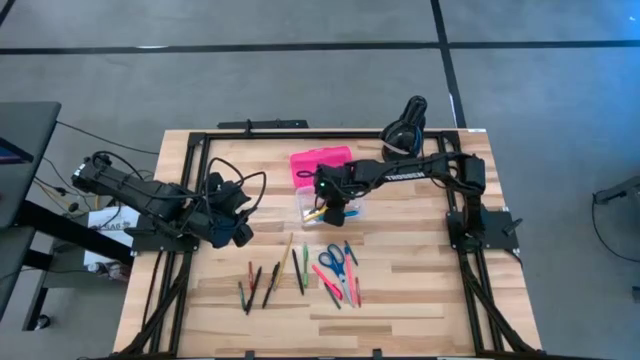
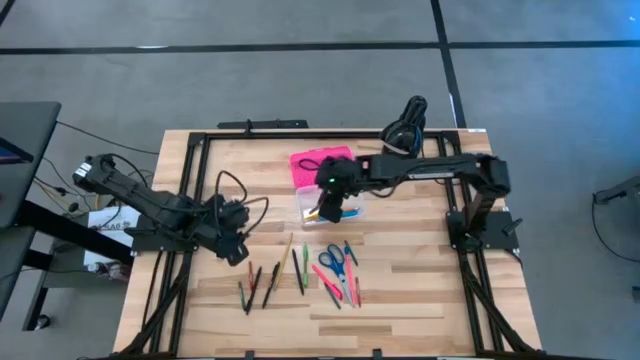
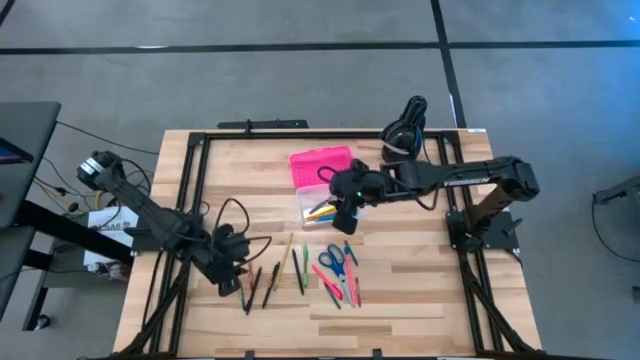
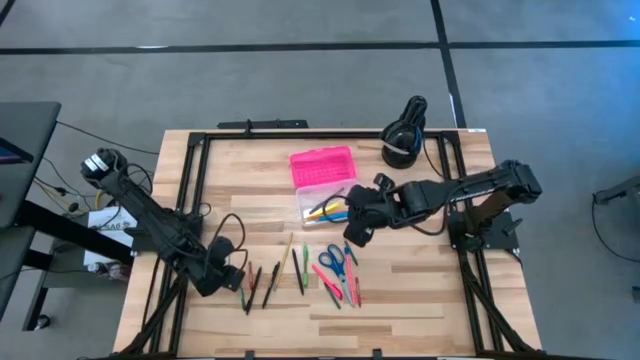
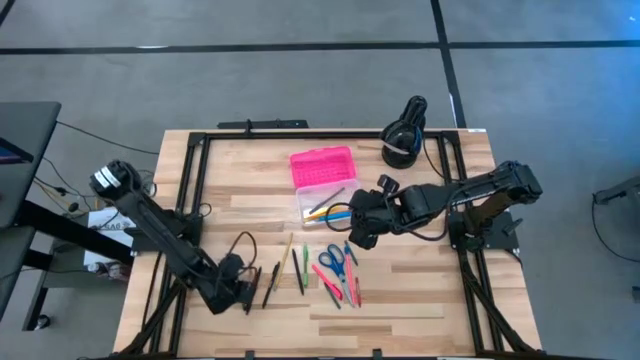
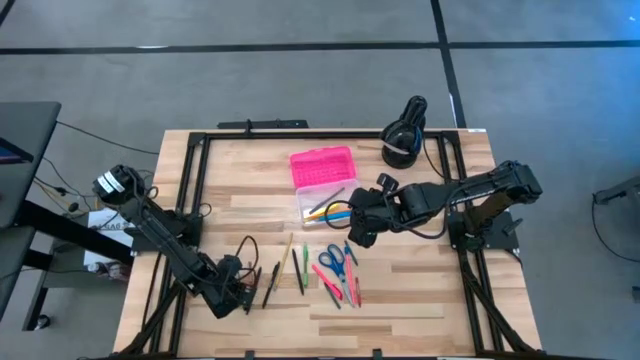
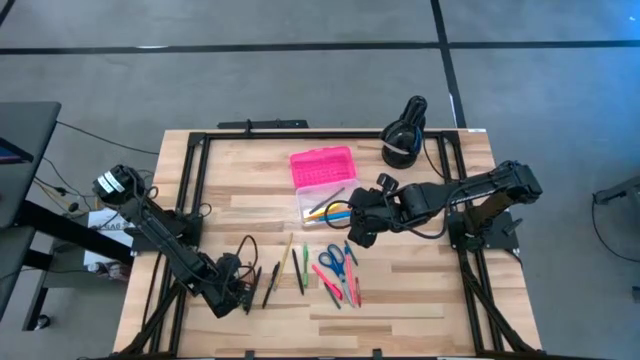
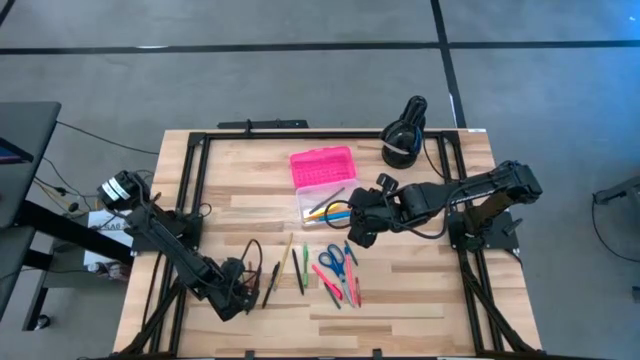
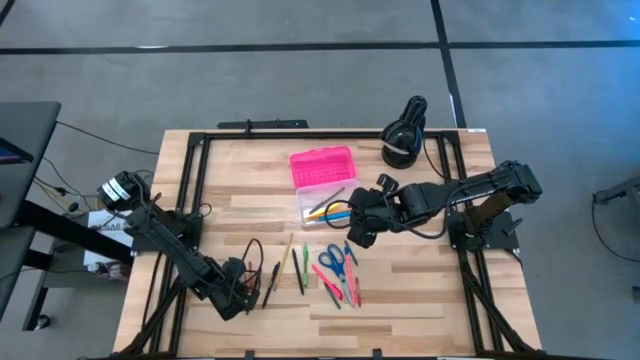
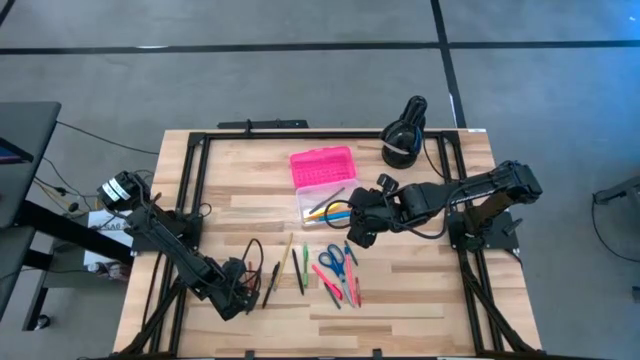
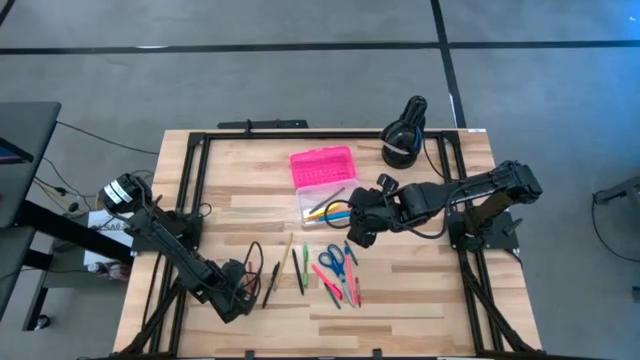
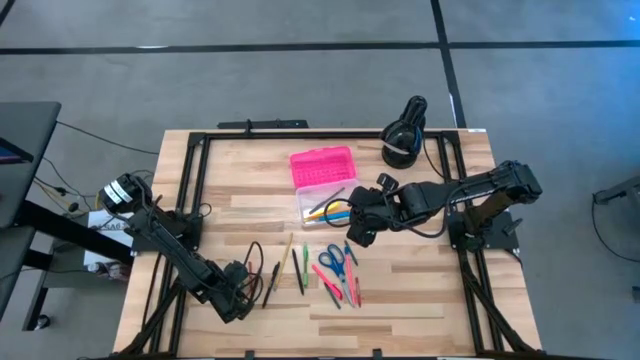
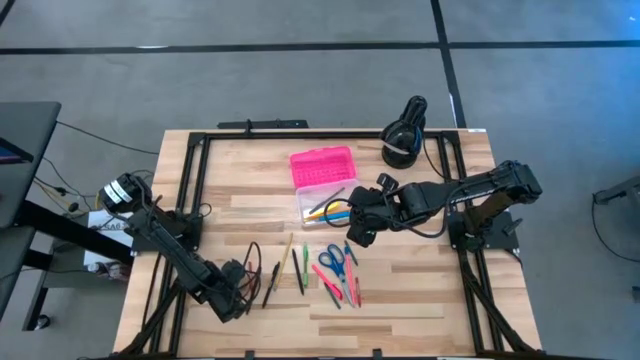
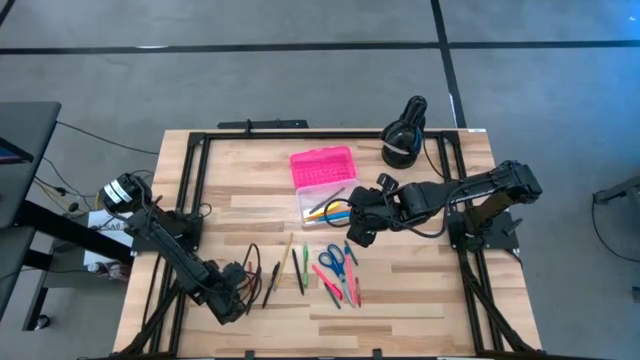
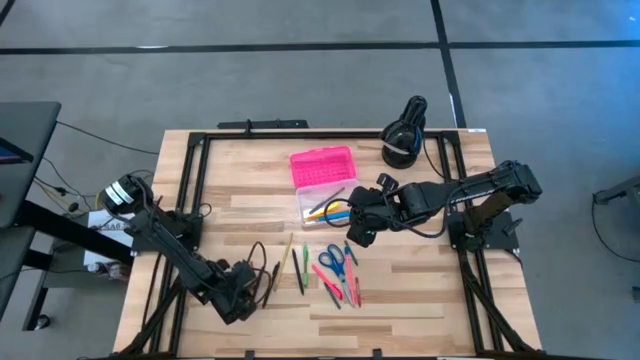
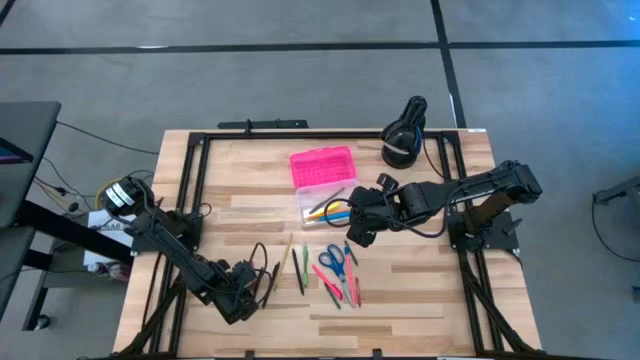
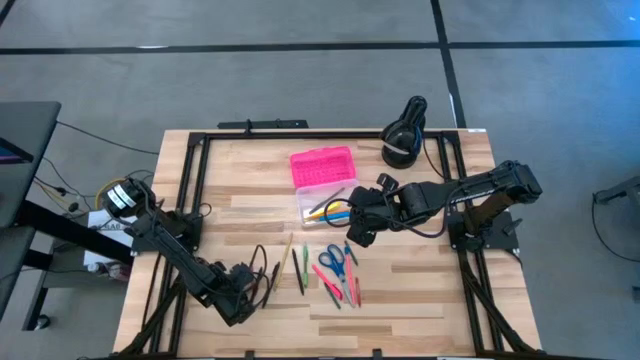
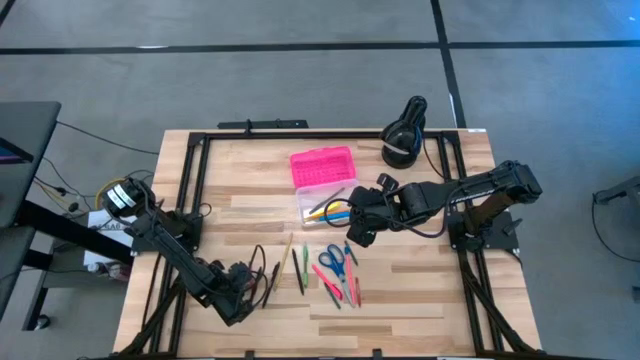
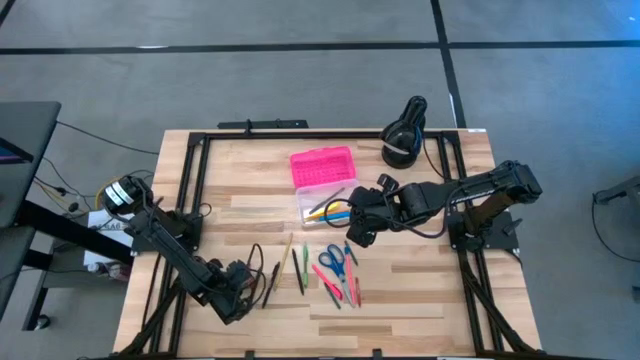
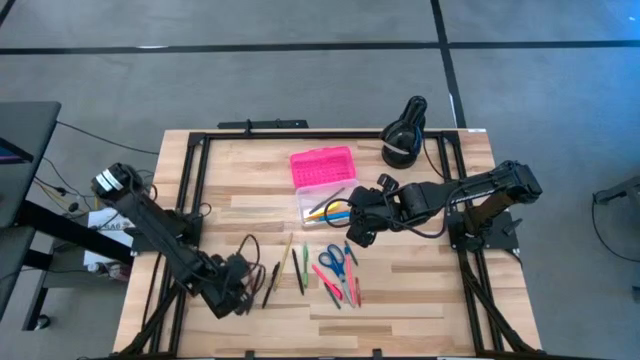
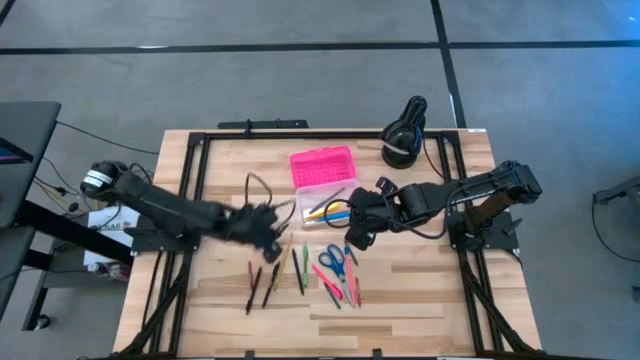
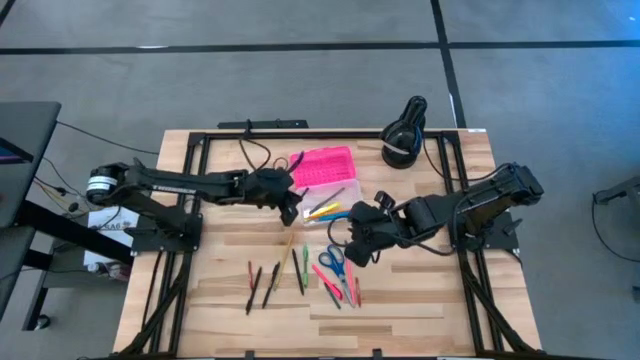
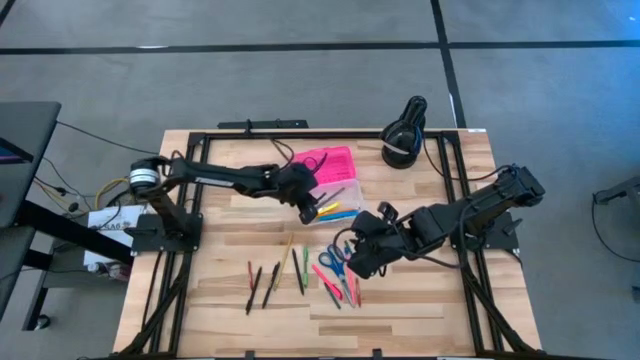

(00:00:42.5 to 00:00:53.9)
Task: Pick & place school supplies into a supply box
Put the green crayon into the pink supply box

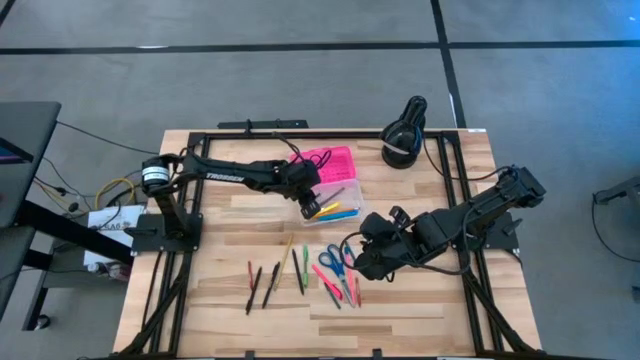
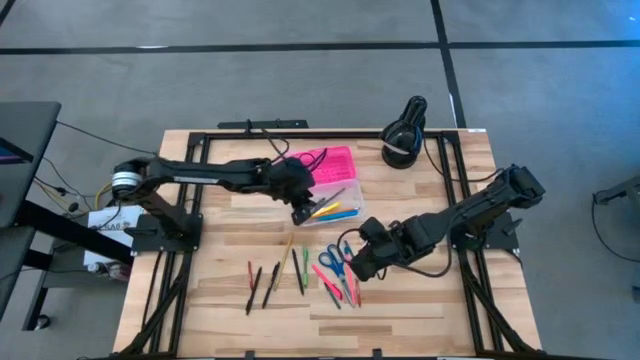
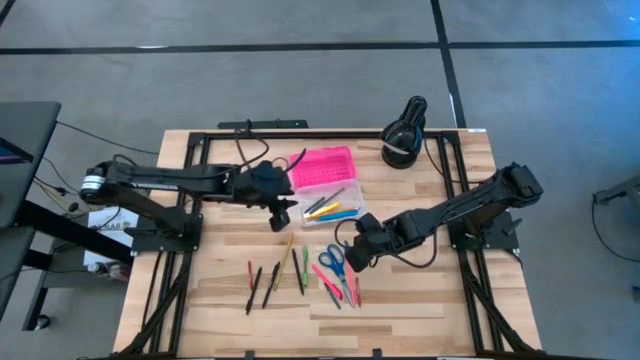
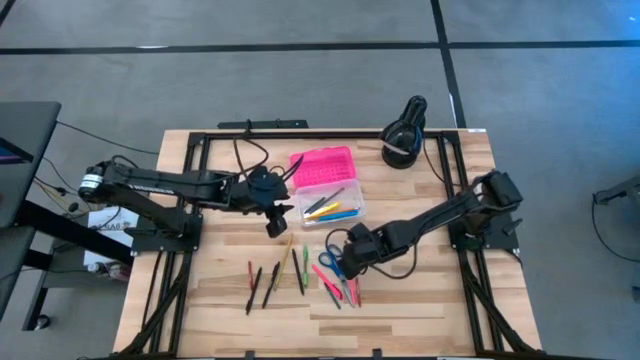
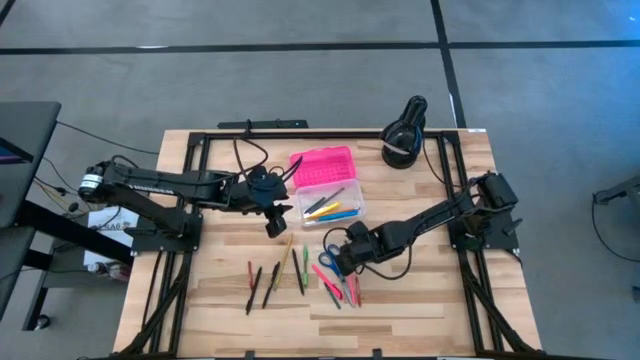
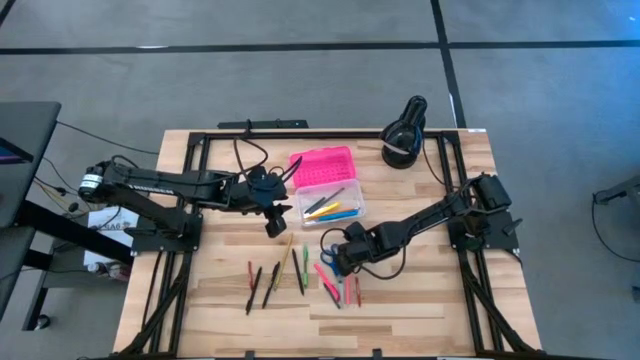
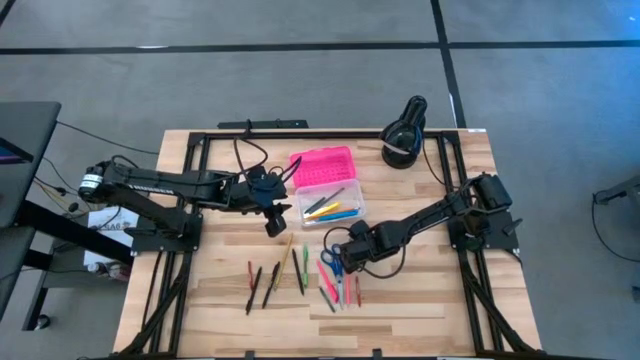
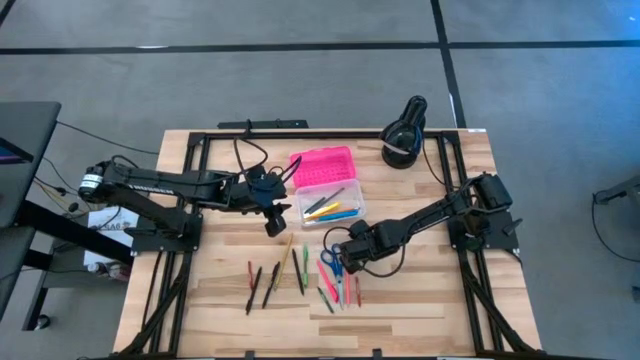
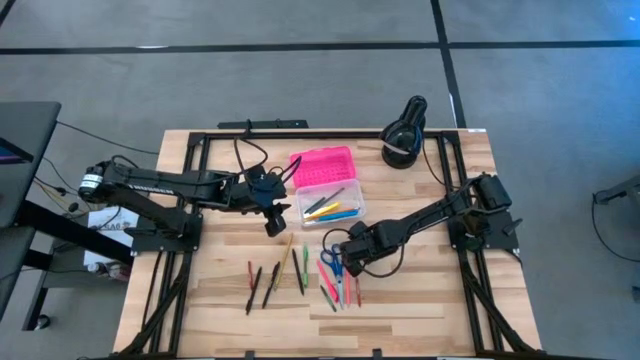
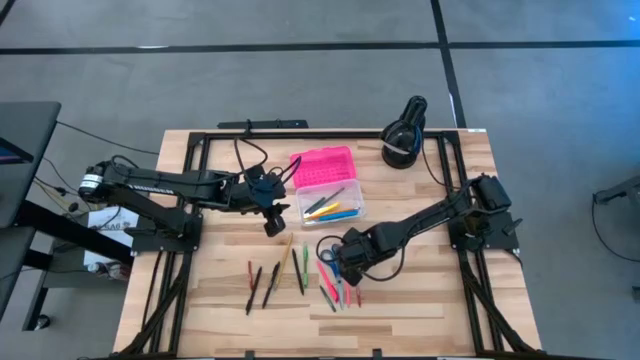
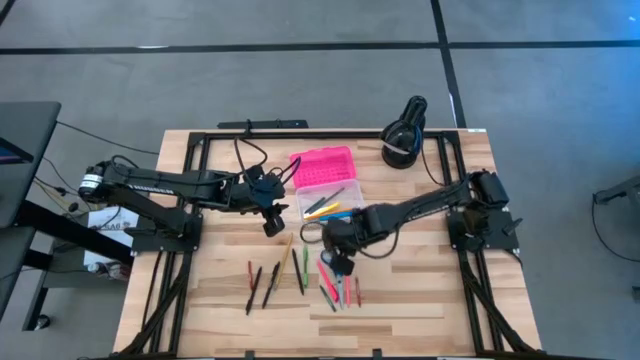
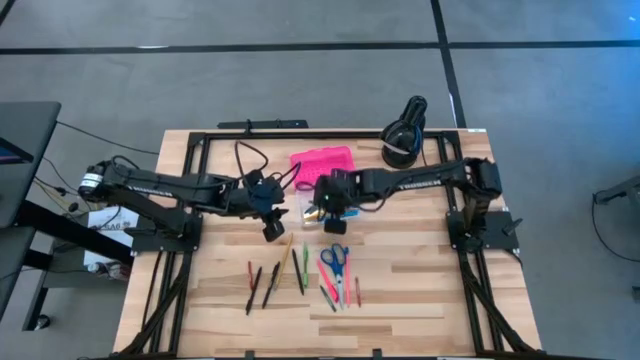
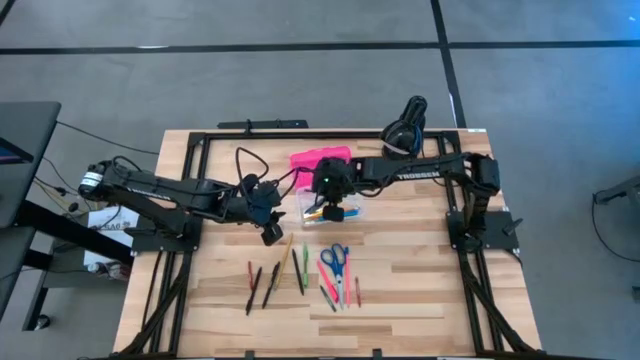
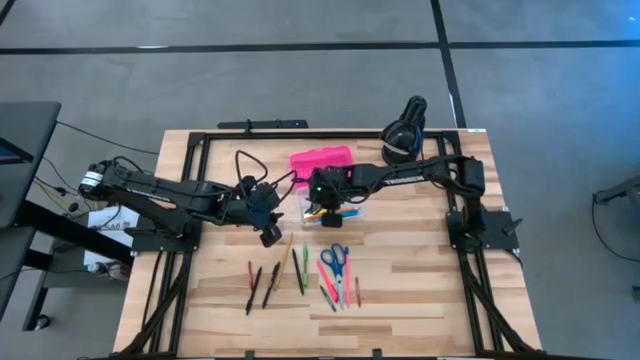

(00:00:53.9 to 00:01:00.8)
Put the green crayon into the pink supply box

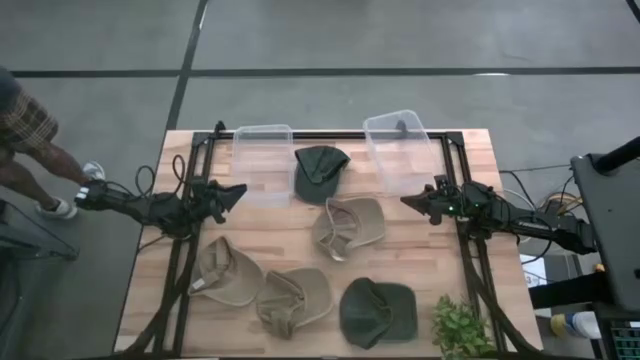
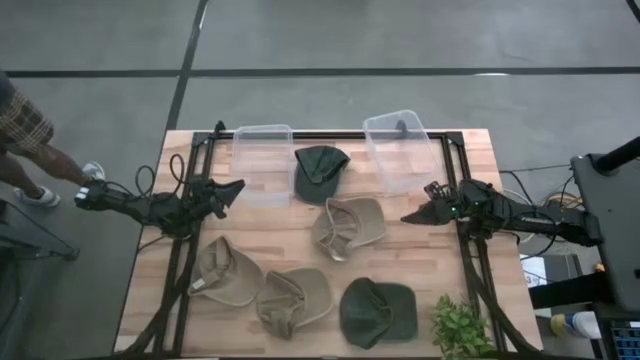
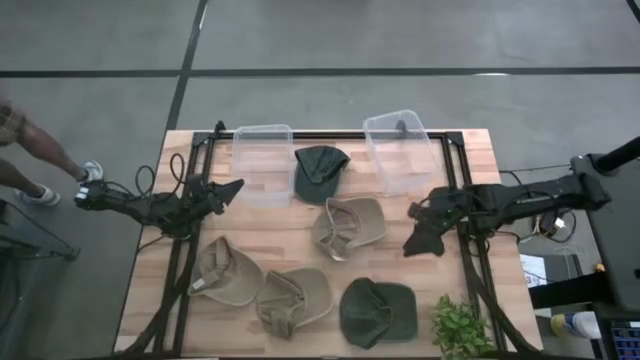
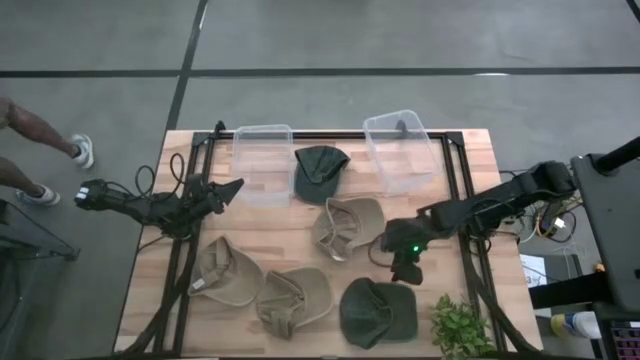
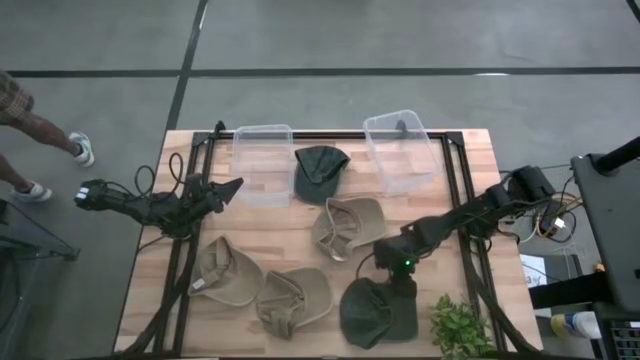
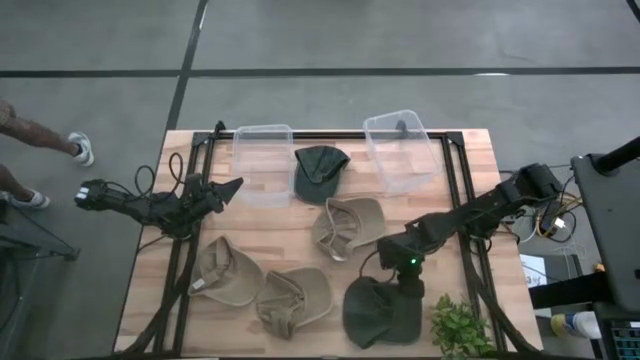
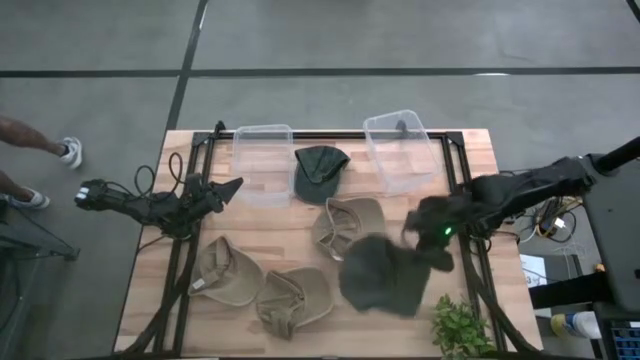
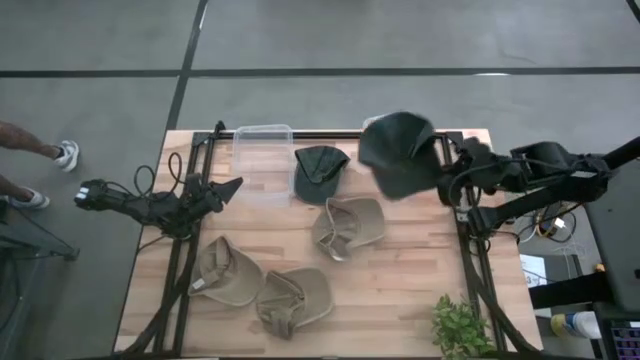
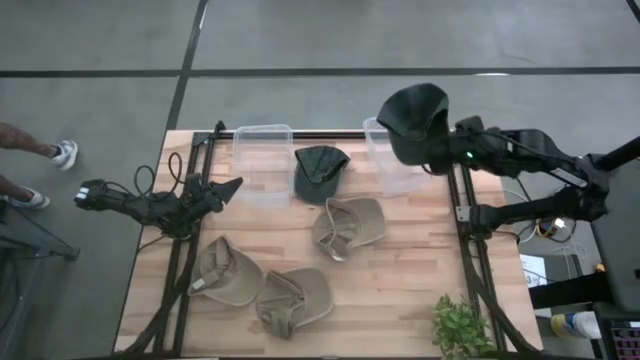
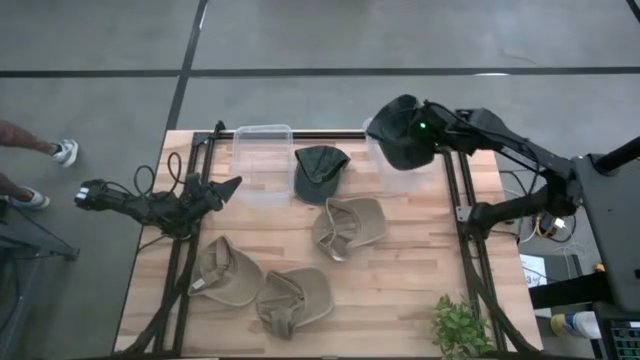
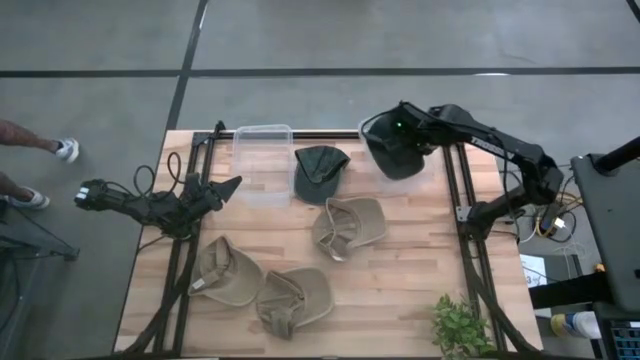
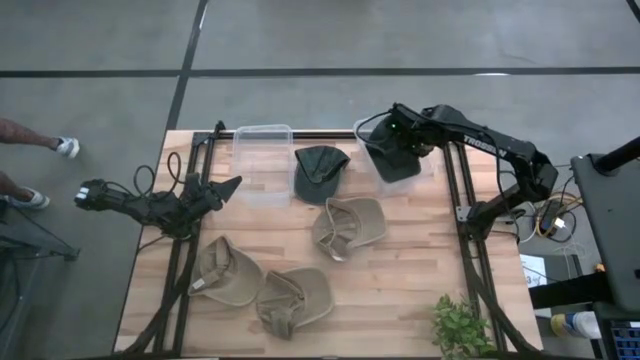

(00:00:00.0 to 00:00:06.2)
Task: Pick & Place hat
Put the bottom black cap into the right transparent bin
